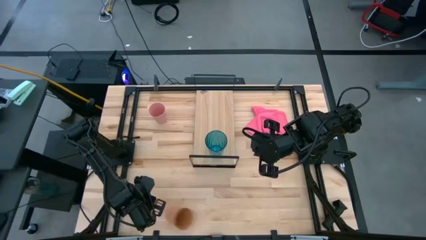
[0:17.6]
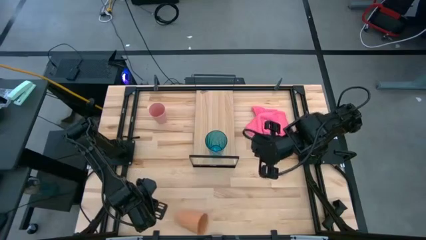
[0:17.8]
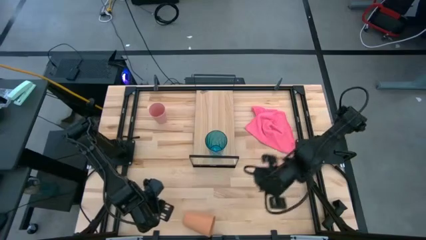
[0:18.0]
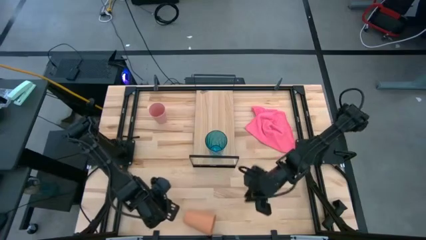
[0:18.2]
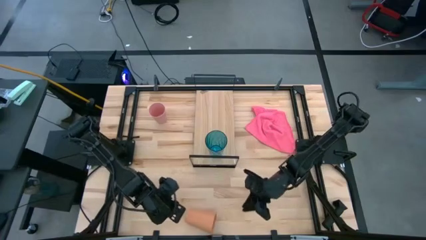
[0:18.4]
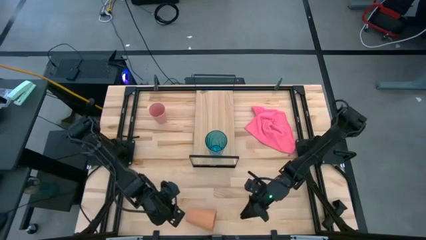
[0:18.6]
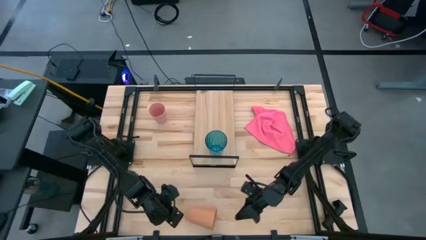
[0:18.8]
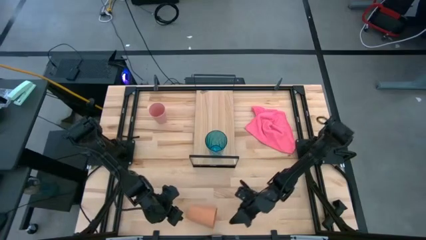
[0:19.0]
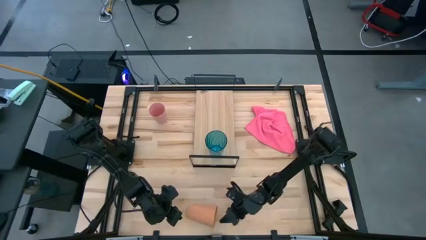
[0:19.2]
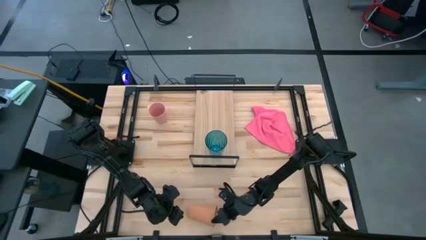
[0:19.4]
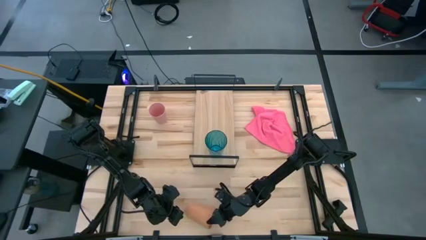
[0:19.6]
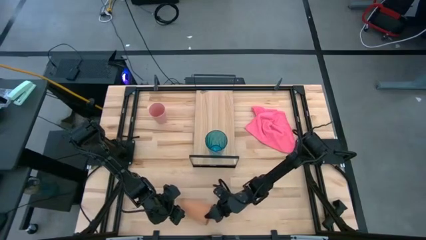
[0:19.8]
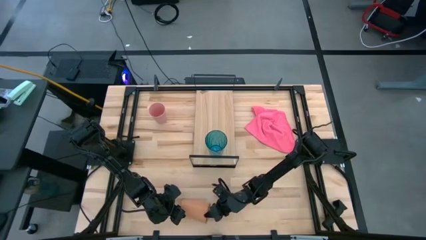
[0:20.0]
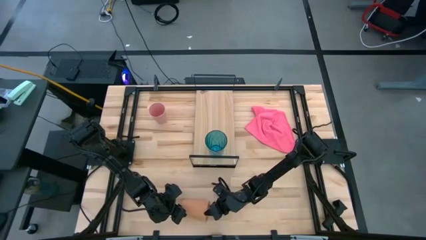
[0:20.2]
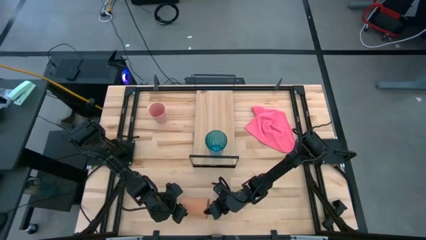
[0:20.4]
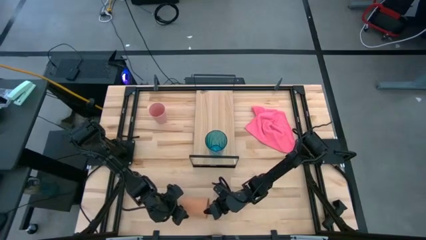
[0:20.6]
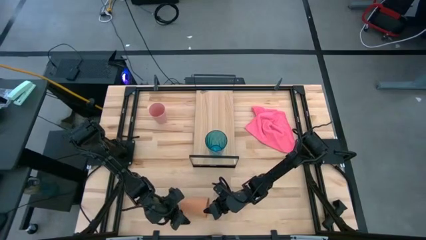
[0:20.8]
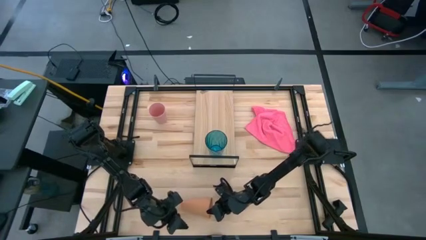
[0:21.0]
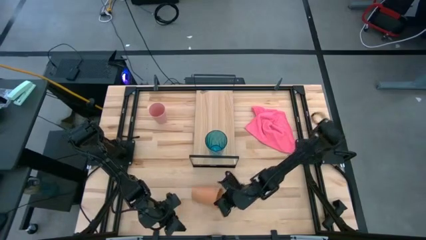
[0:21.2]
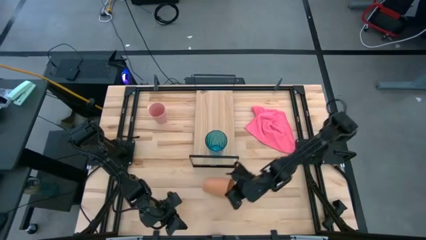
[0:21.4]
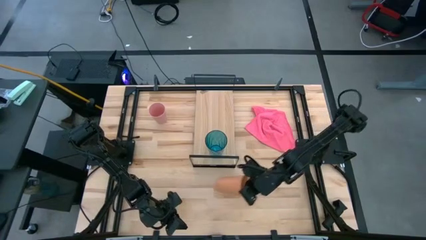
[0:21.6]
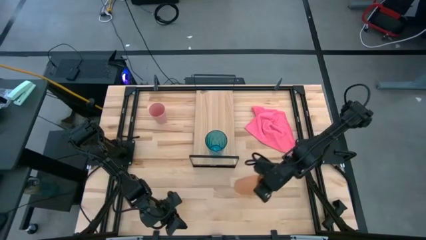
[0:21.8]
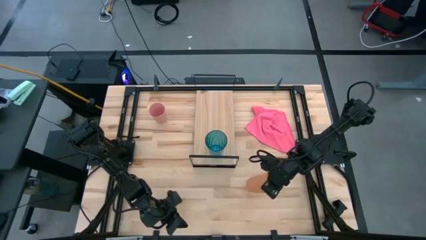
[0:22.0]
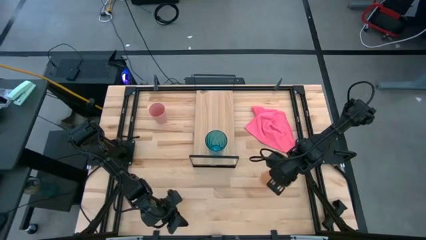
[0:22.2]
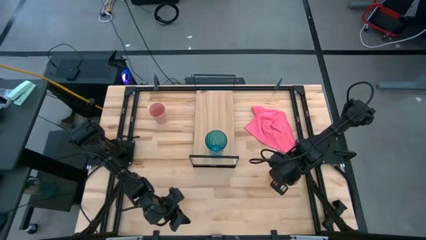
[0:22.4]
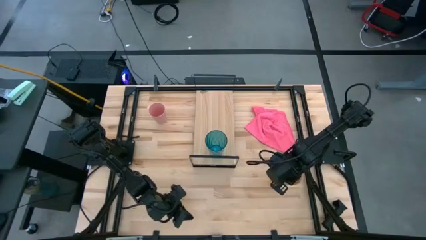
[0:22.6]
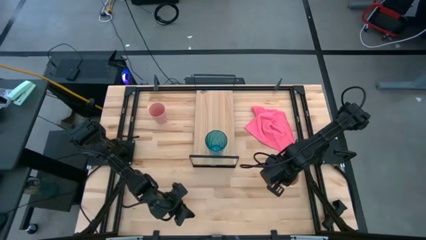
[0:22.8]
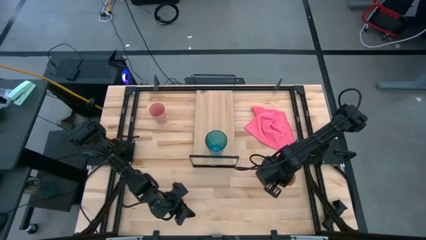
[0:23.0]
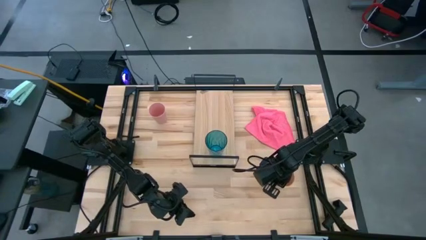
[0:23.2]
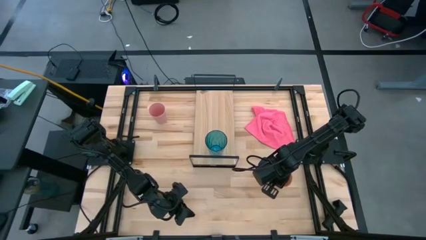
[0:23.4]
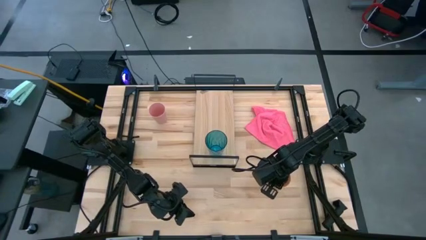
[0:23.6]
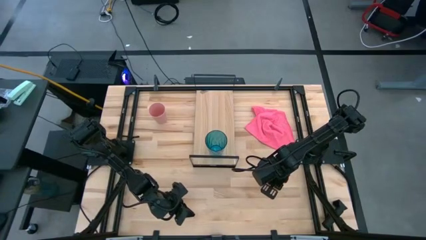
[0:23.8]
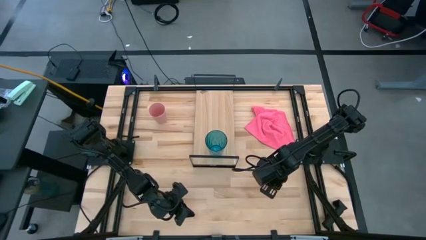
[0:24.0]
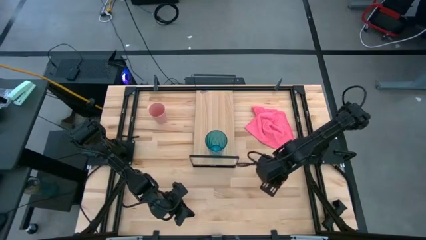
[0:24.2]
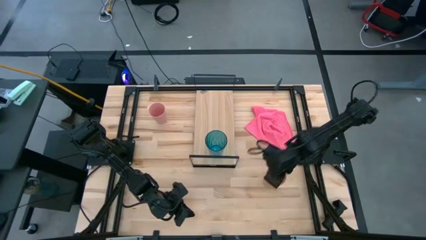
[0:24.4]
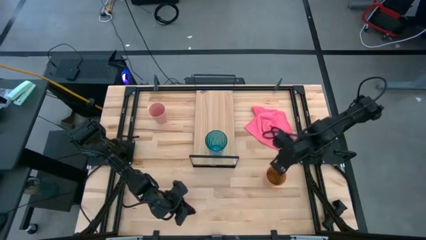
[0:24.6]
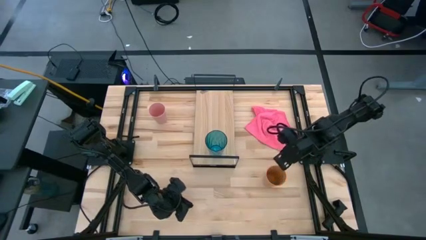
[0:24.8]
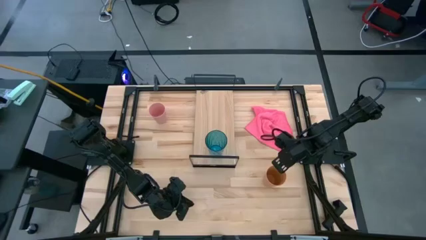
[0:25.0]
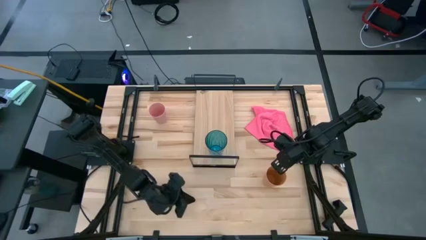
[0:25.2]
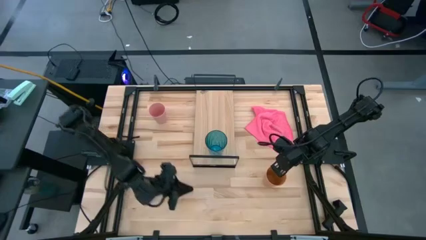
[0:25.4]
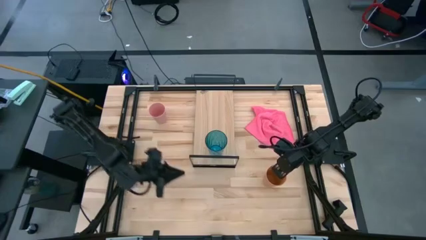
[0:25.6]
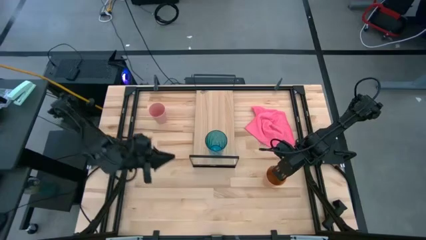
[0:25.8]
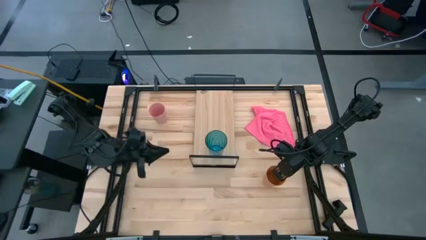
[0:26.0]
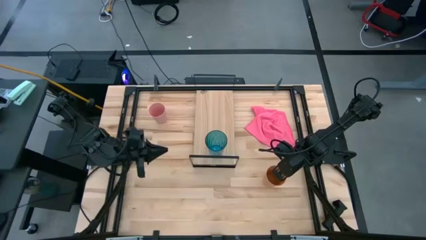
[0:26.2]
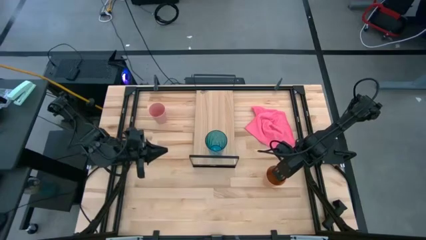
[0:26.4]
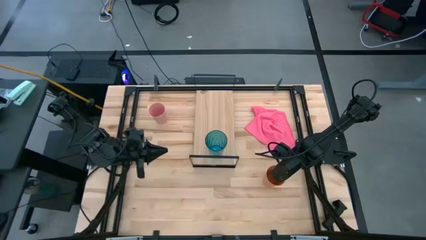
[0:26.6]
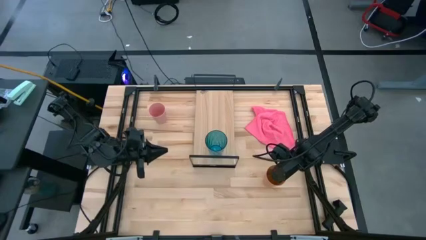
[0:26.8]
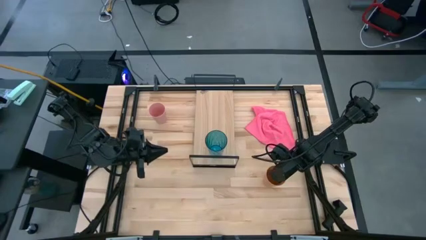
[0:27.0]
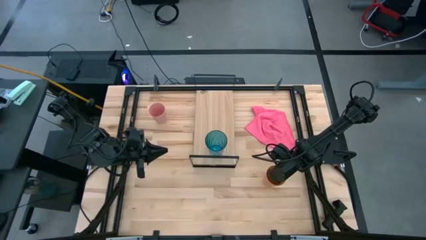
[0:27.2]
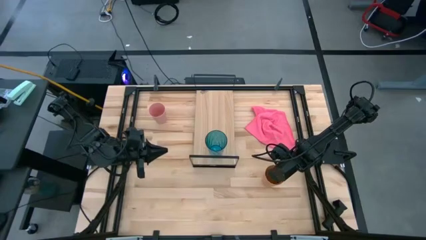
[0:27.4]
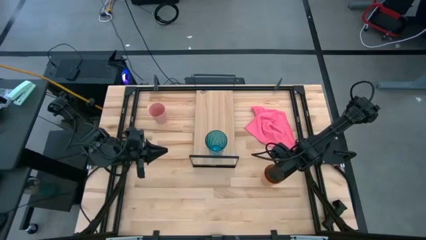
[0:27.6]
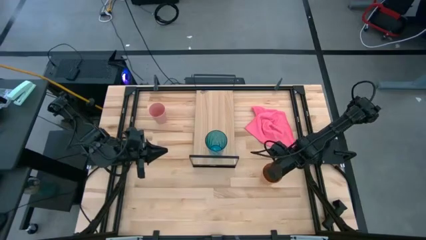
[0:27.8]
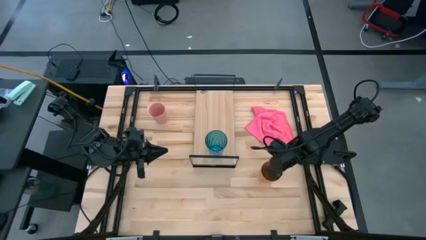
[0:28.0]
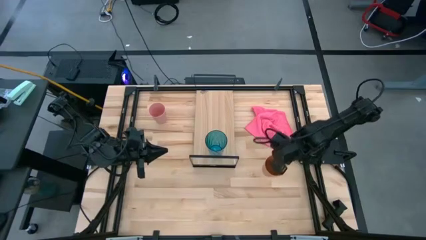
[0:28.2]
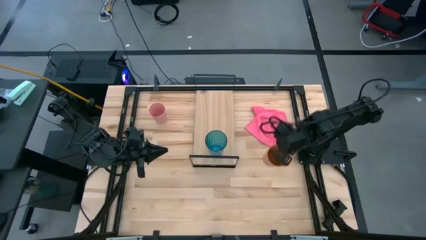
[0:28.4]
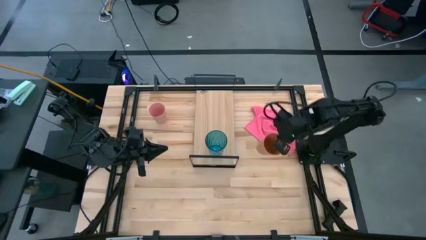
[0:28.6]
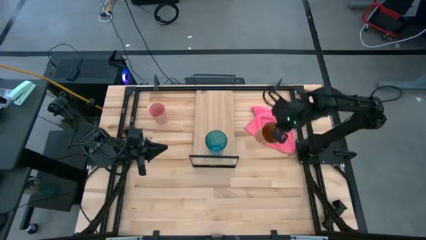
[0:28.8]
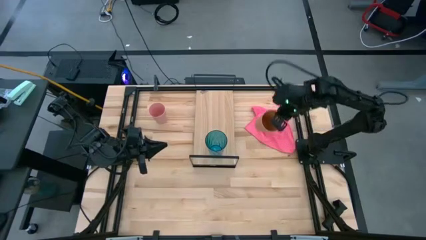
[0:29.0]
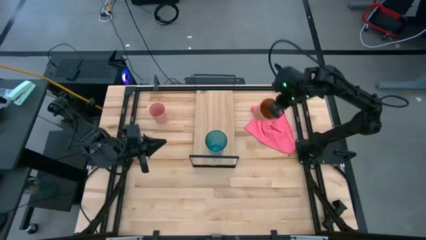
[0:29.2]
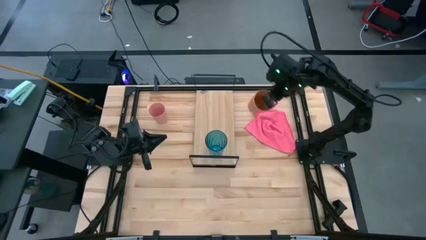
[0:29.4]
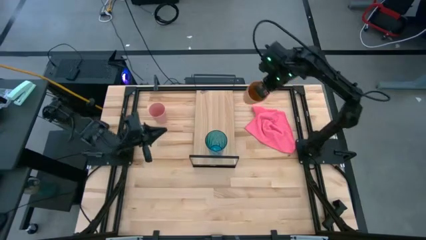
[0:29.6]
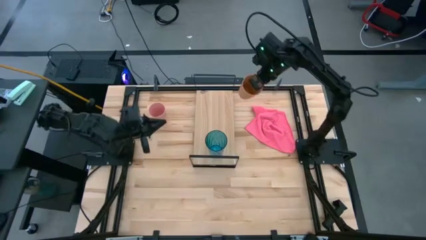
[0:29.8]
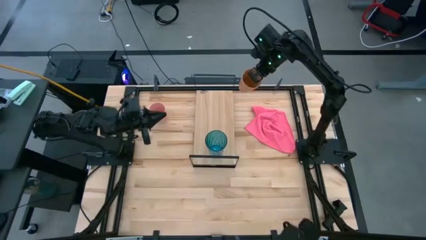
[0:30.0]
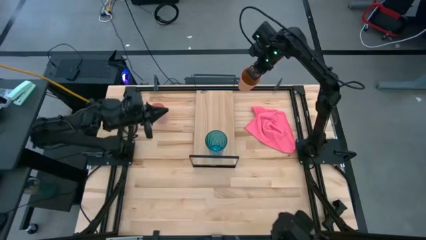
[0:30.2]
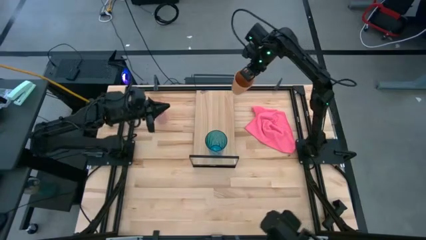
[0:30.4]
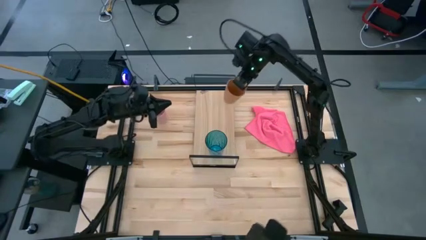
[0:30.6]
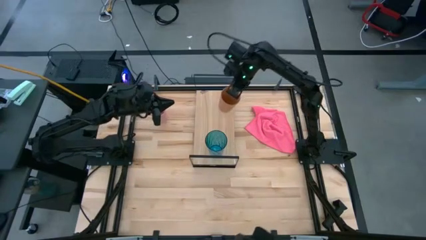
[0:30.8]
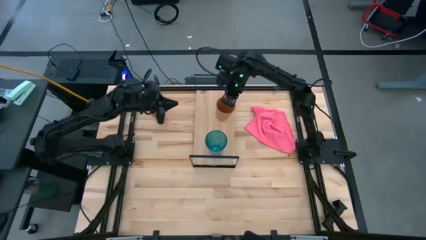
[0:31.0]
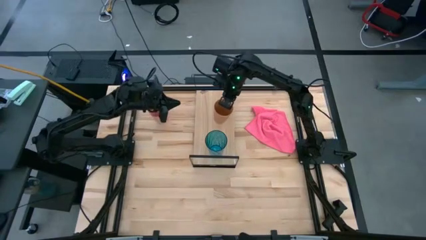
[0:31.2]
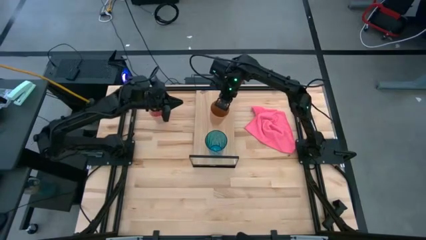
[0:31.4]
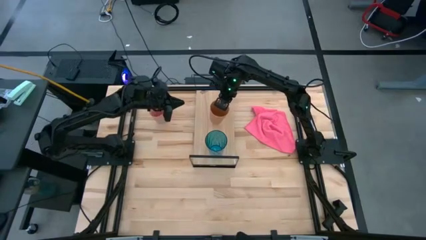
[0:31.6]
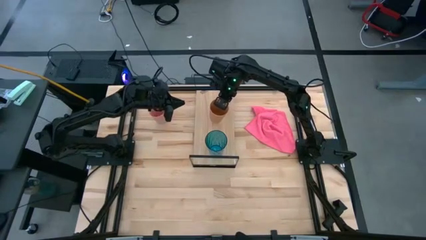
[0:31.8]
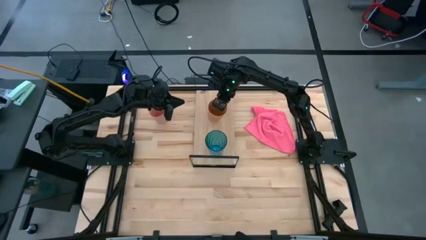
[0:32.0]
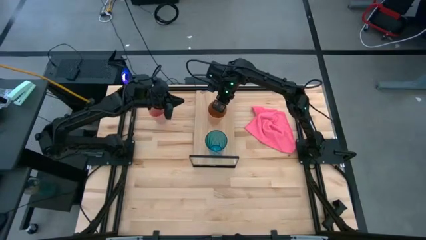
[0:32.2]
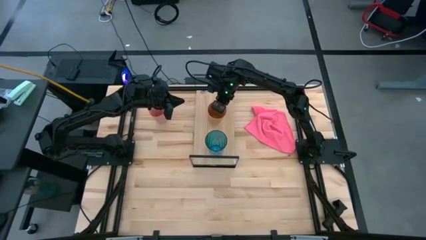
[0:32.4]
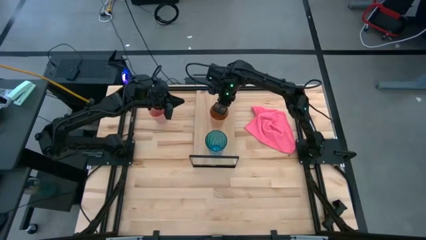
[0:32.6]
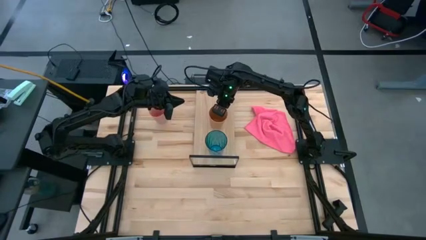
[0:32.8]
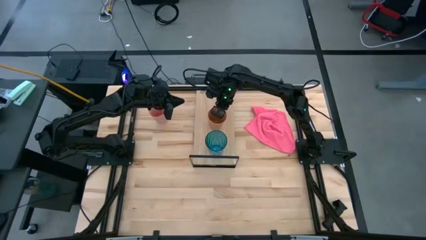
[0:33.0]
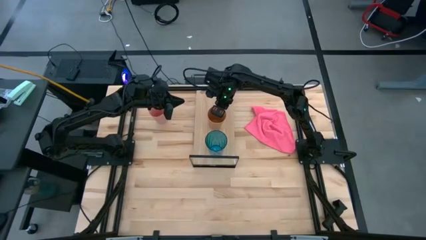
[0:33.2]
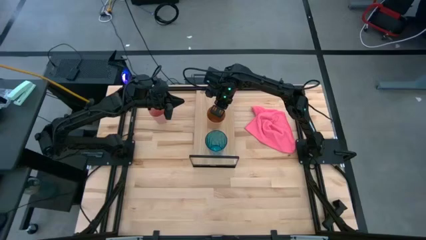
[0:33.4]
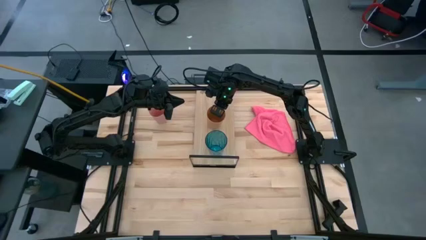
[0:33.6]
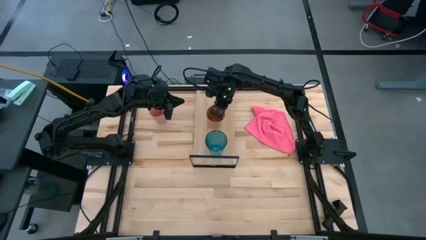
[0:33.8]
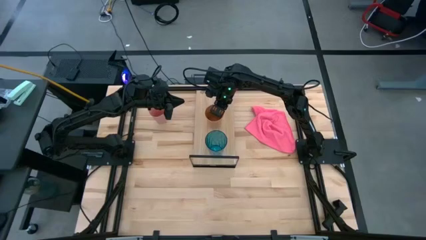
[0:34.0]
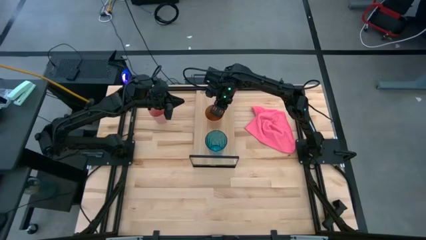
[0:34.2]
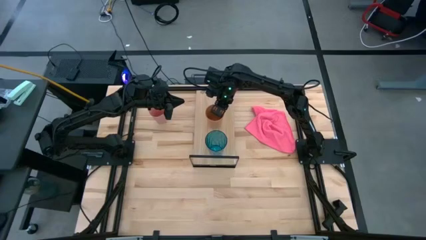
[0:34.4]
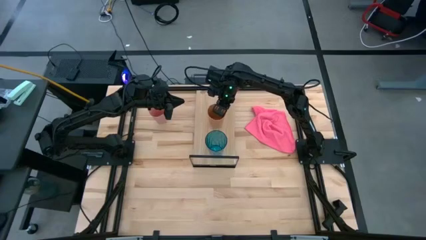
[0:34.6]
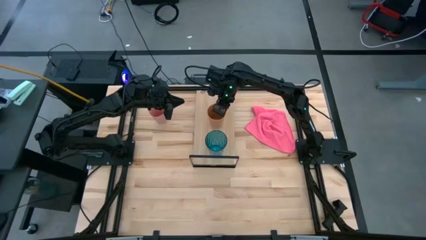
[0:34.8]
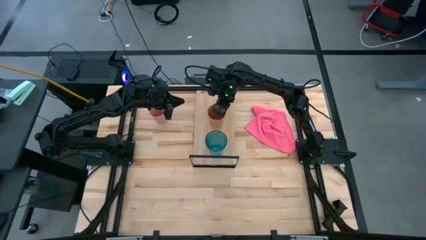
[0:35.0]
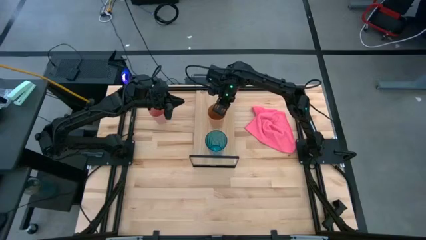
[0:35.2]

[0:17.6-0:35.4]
Task: Stack small to large cups/mugs on shelf
Put the brown cup on the shelf
